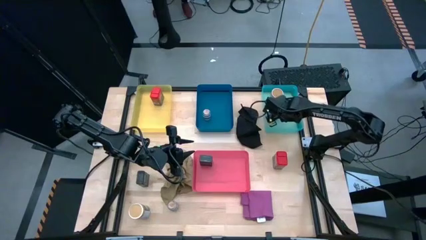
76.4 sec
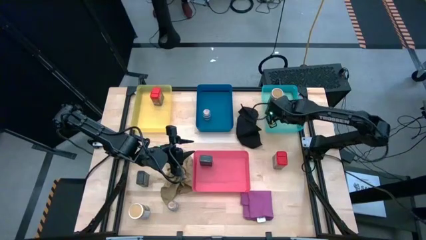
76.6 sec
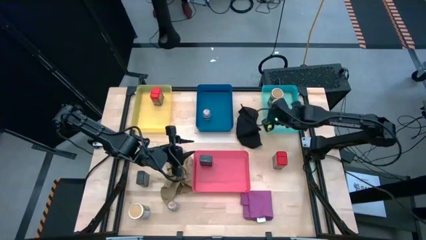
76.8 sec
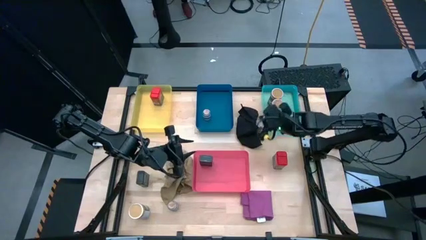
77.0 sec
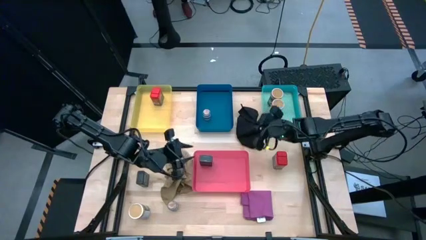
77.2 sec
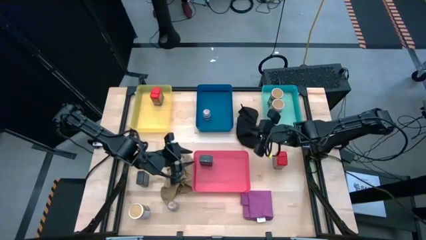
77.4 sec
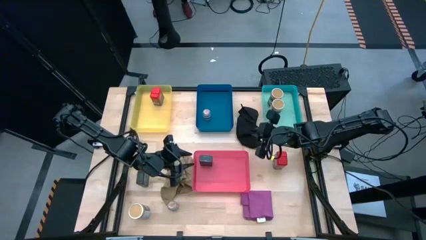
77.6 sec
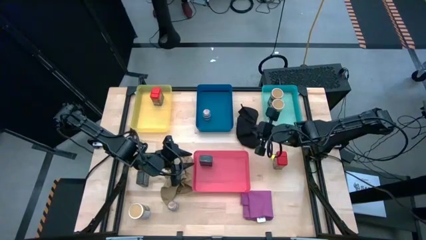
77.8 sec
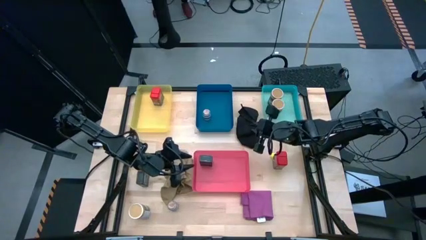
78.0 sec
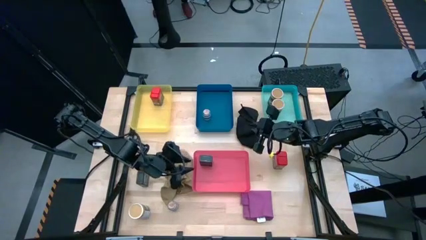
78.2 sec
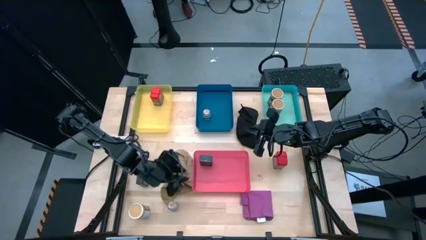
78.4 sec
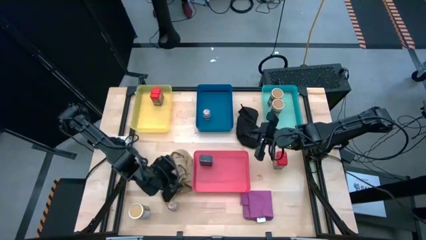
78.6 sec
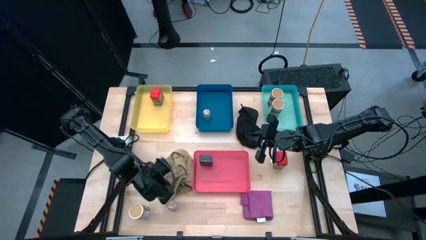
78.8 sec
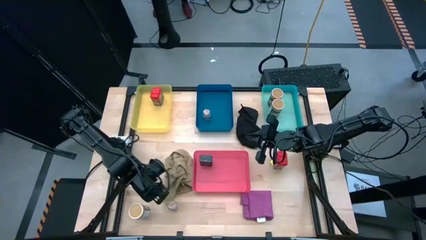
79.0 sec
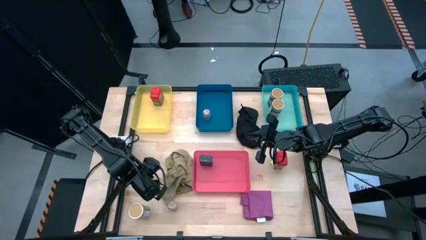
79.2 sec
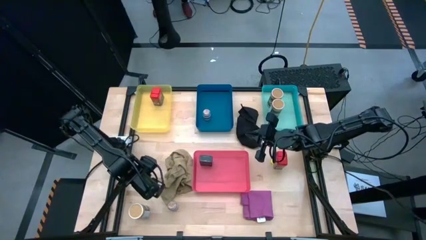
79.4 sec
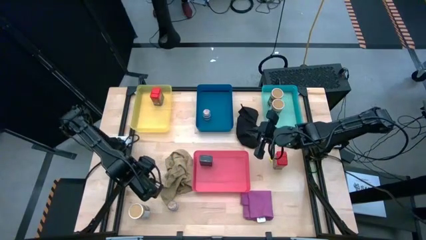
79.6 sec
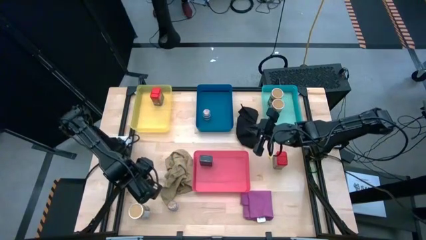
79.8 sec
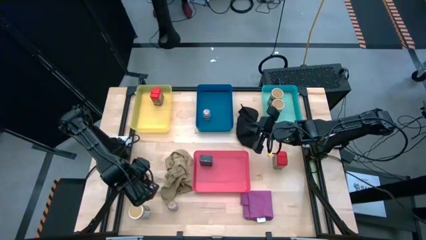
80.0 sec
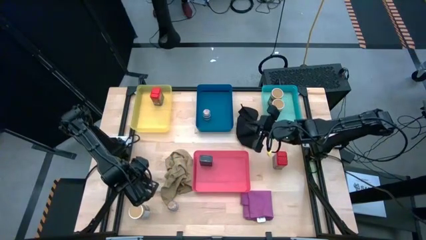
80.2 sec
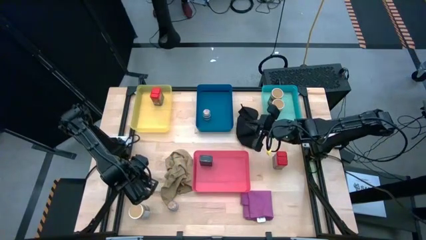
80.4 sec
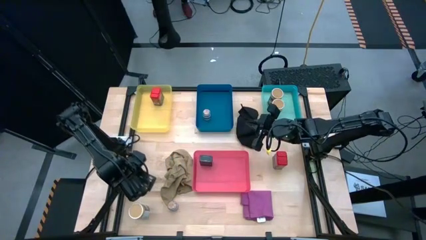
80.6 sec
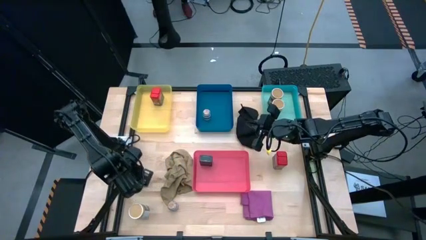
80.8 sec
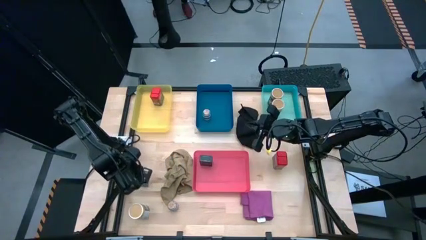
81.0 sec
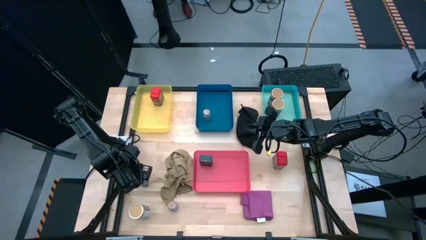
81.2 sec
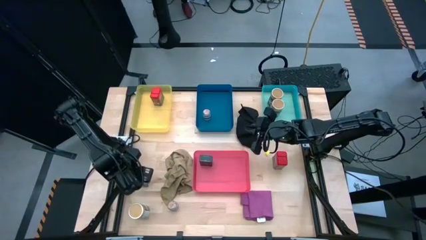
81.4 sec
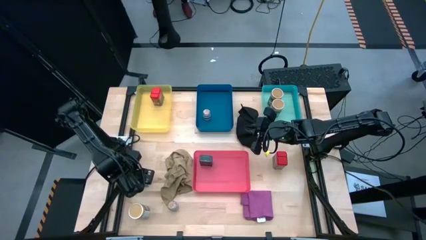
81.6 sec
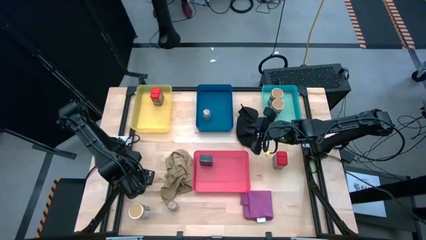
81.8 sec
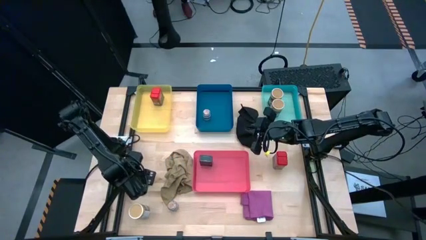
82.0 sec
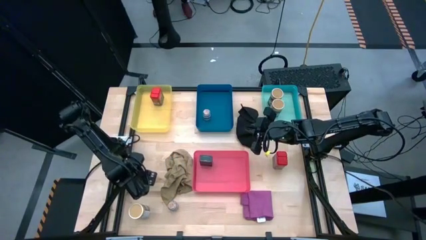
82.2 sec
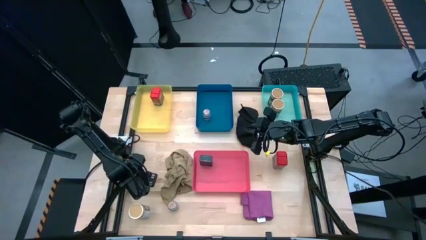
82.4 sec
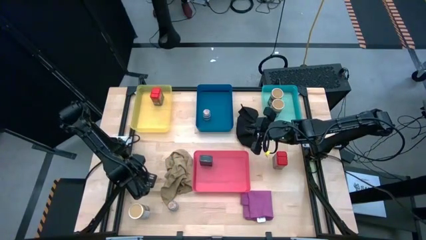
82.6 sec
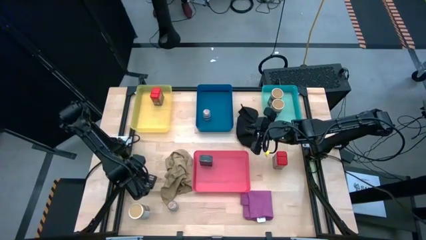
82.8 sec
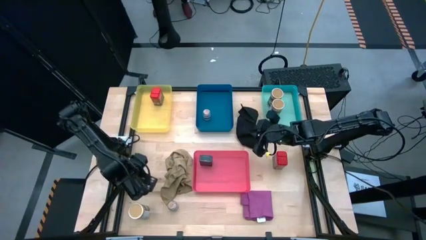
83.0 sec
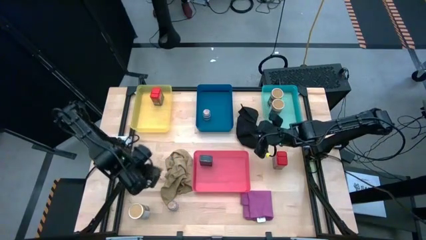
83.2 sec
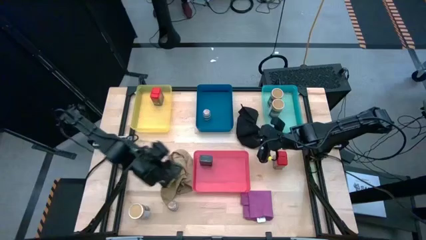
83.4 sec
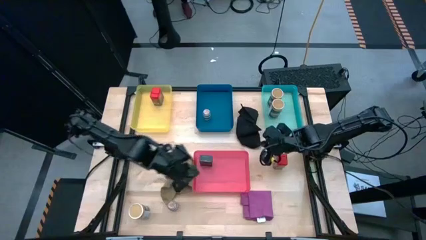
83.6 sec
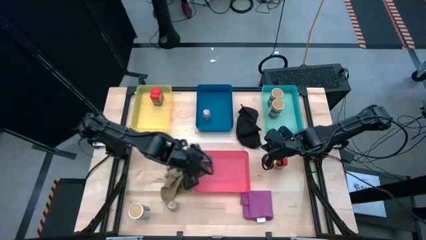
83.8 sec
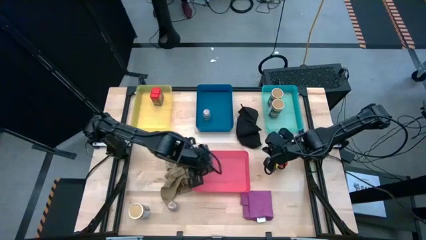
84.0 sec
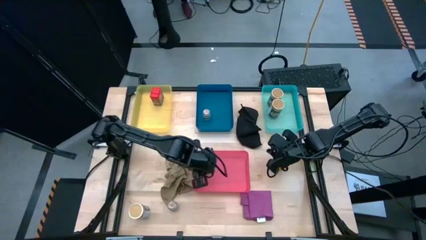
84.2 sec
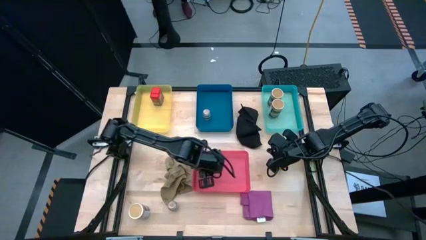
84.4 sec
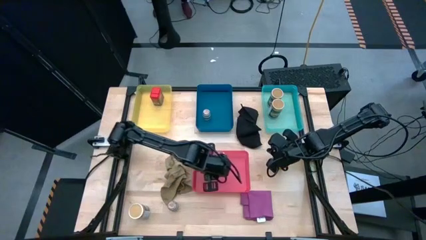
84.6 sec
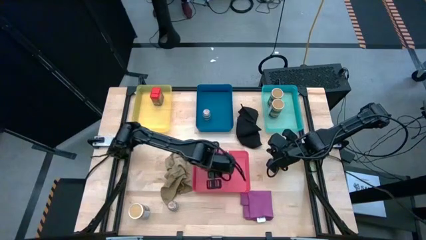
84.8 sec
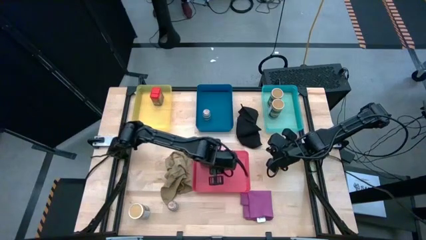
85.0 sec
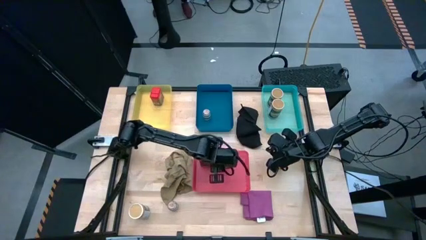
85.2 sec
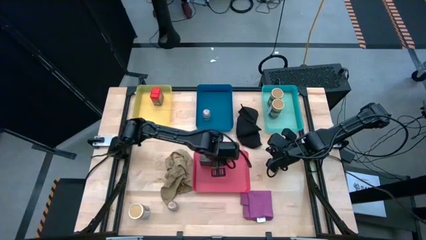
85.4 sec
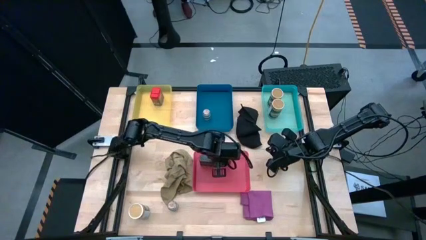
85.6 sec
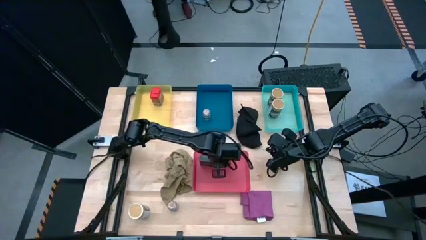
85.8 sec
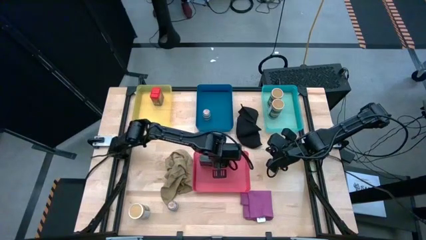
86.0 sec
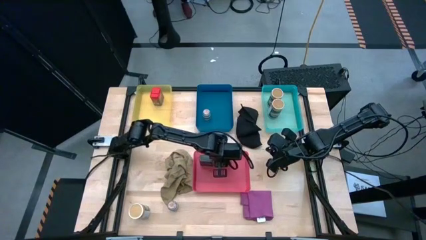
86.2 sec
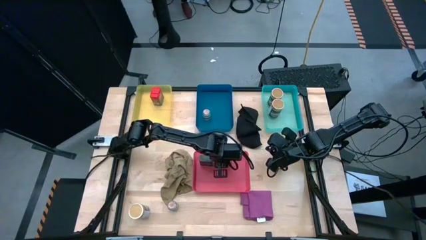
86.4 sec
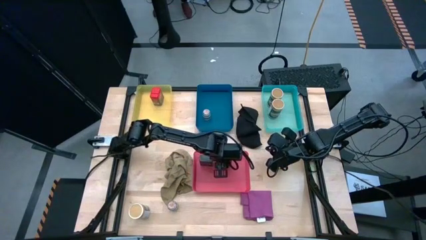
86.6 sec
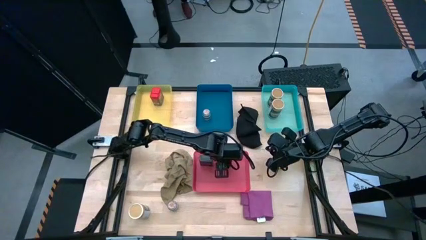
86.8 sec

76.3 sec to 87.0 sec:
Task: Sort spices by type
Put the black seasoning can into the red bin

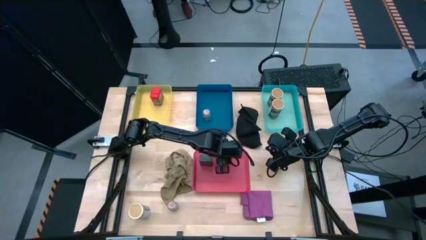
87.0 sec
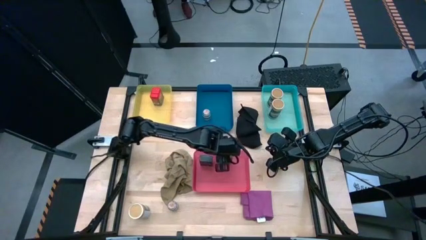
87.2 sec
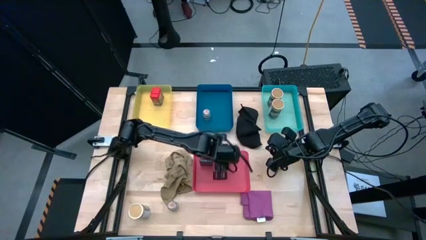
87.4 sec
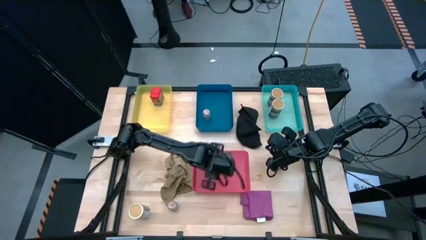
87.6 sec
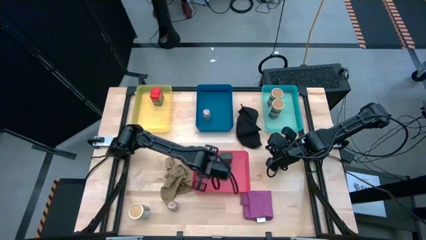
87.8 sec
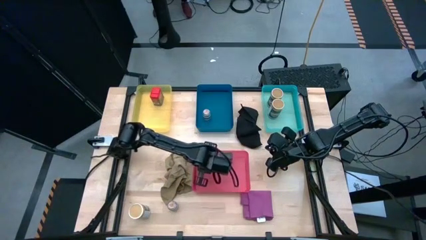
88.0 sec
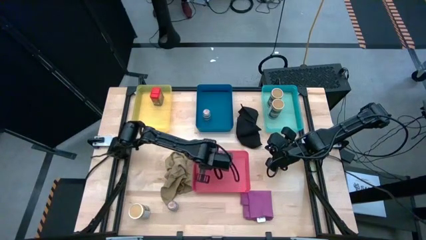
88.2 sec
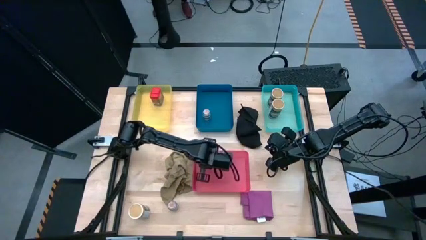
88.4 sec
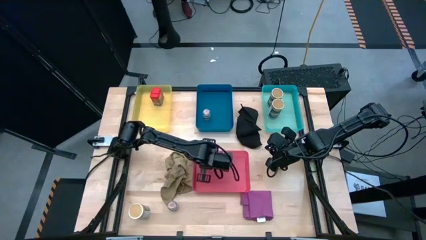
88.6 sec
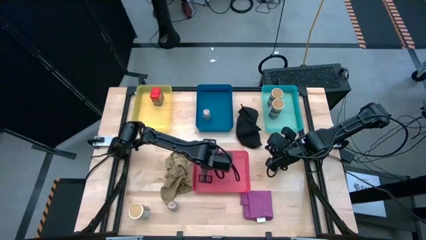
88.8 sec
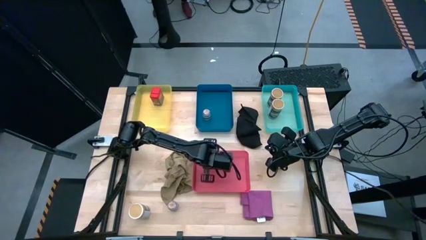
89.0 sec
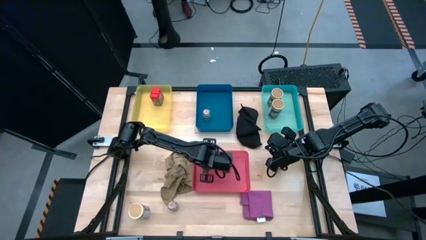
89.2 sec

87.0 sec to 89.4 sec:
Adjust the left black seasoning can on the red bin

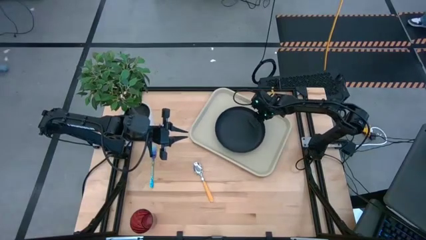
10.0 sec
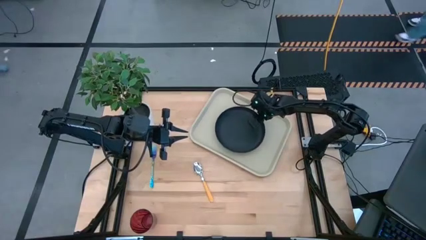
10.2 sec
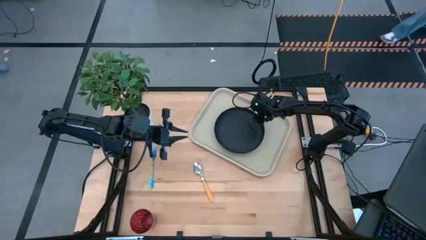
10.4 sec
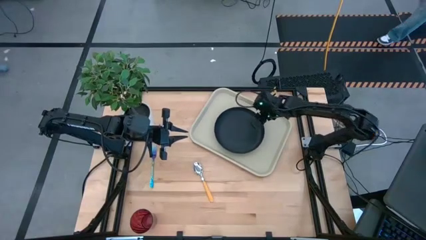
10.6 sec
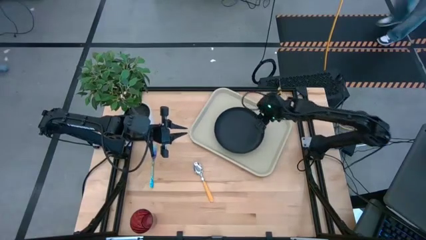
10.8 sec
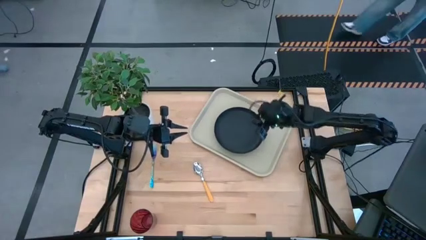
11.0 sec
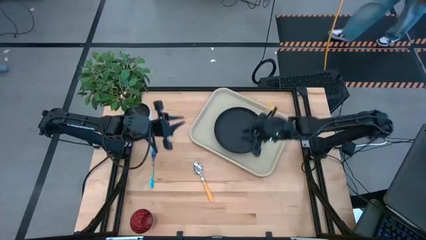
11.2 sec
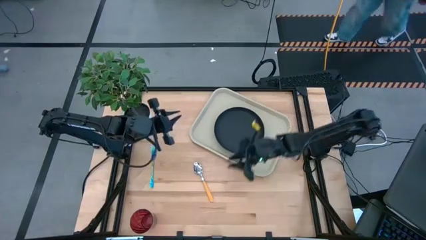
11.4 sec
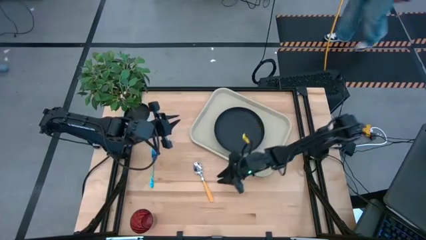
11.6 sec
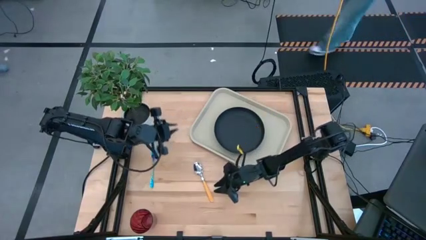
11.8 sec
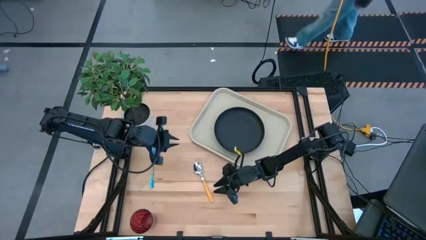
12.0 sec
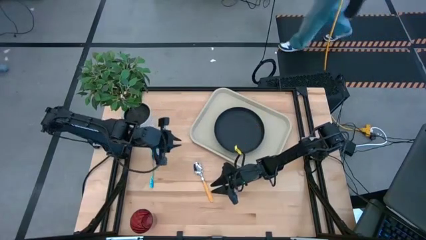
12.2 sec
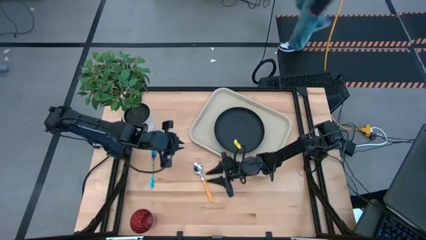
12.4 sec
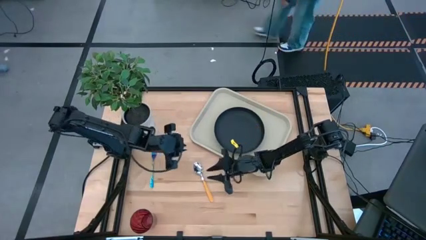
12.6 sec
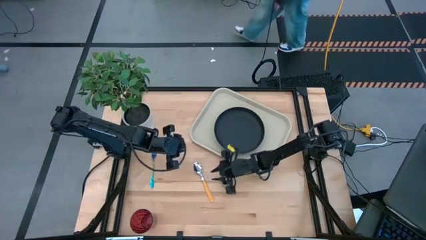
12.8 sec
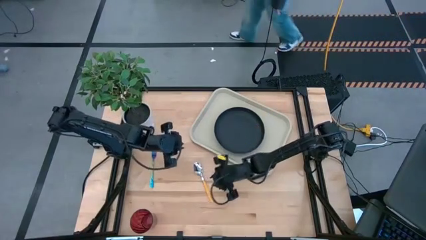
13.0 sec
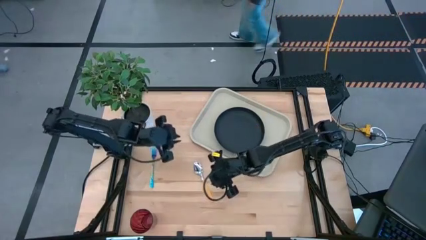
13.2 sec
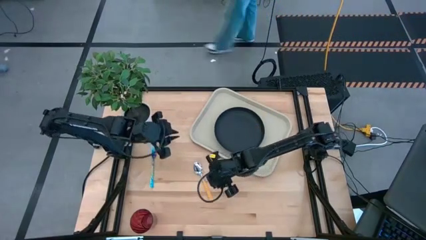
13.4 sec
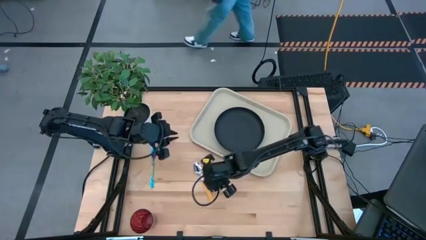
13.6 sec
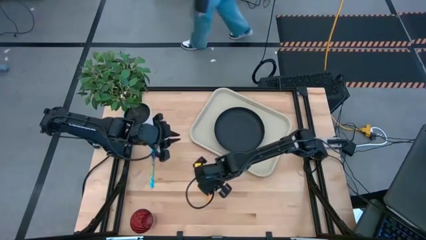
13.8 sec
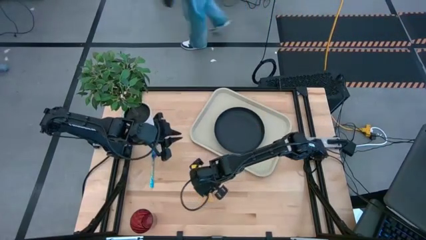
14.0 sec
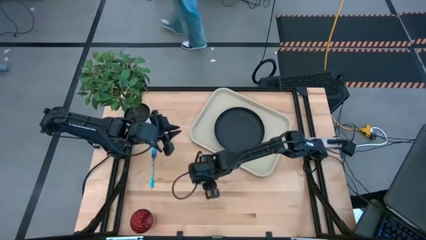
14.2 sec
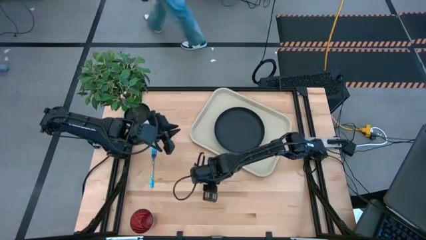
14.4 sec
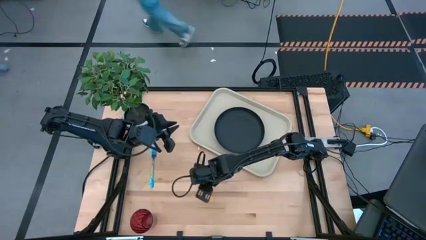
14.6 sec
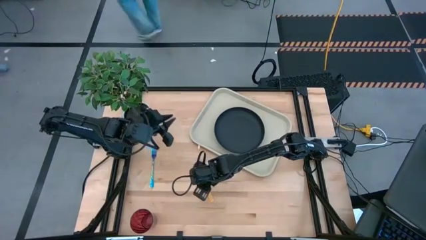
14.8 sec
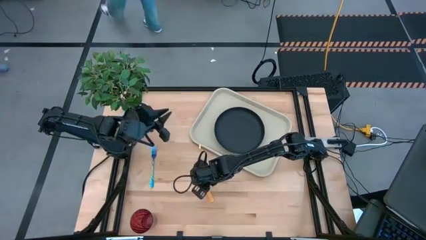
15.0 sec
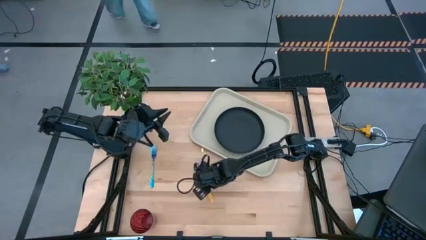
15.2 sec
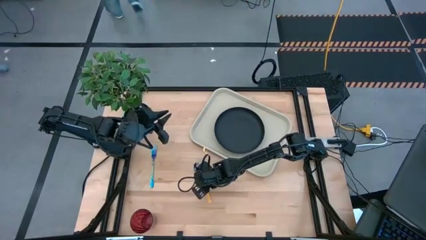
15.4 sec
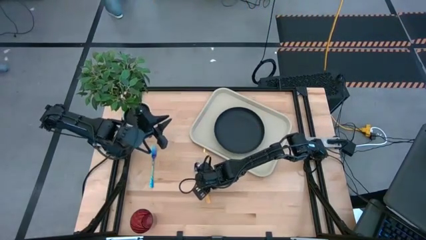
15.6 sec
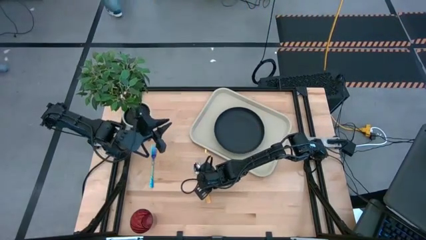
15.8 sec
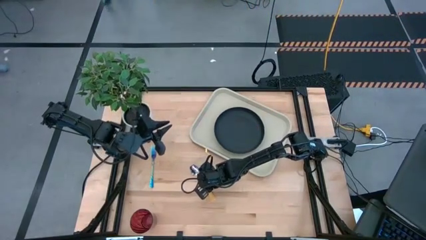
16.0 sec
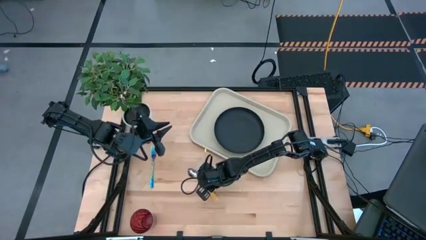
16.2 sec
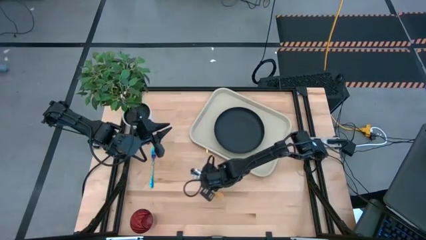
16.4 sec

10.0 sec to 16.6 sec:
Task: Pick and place plate/cup/fork/spoon on tray
Put the spoon on the tray
